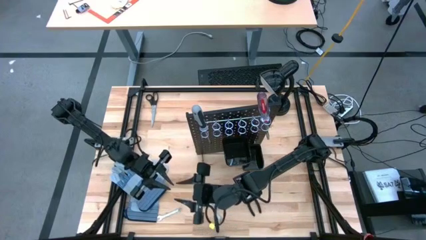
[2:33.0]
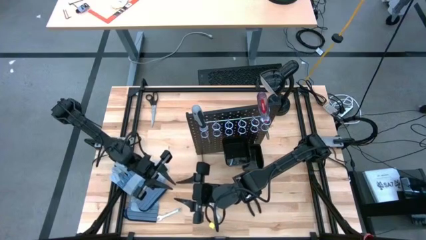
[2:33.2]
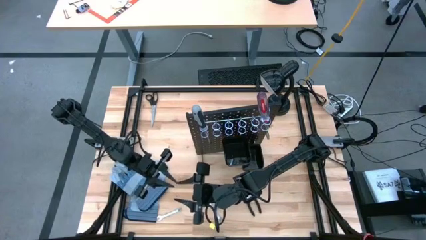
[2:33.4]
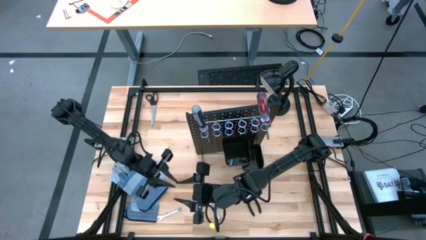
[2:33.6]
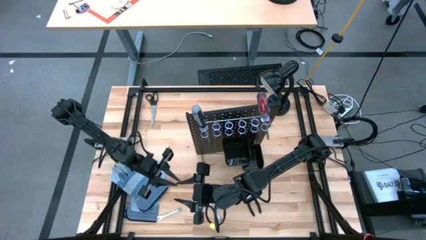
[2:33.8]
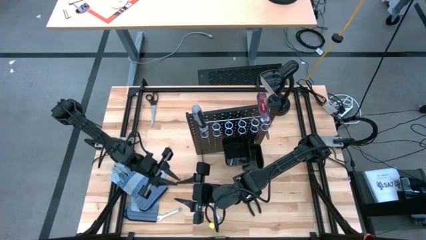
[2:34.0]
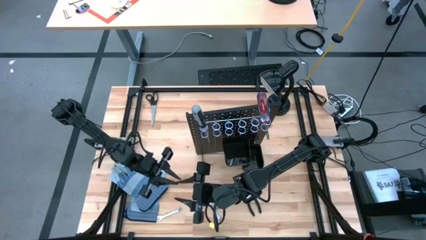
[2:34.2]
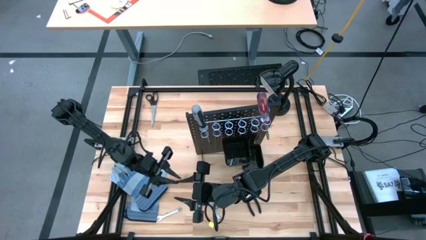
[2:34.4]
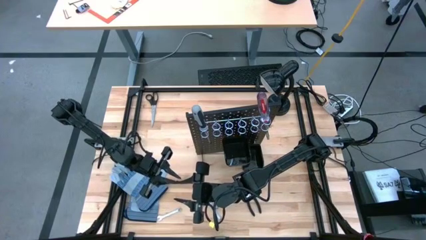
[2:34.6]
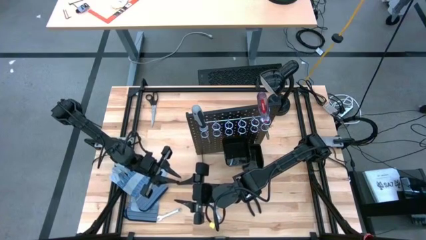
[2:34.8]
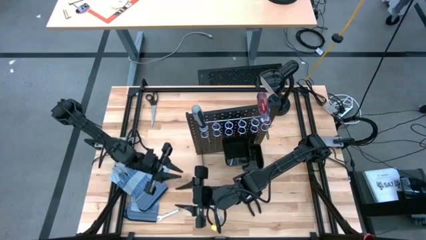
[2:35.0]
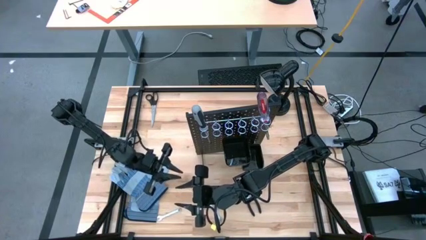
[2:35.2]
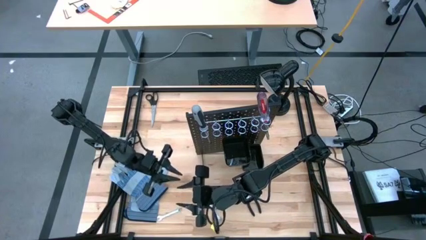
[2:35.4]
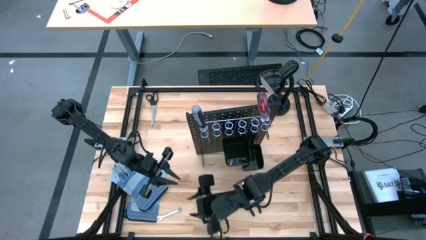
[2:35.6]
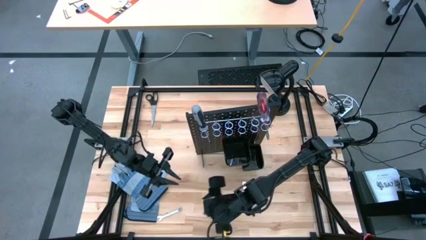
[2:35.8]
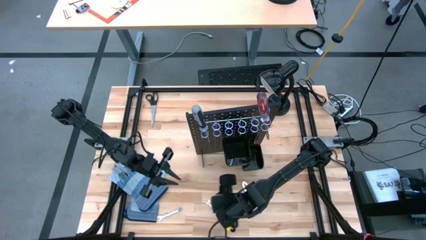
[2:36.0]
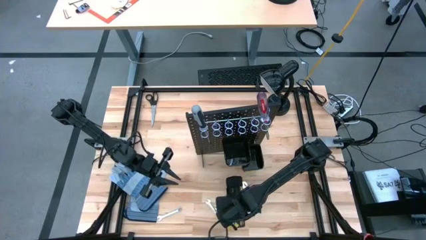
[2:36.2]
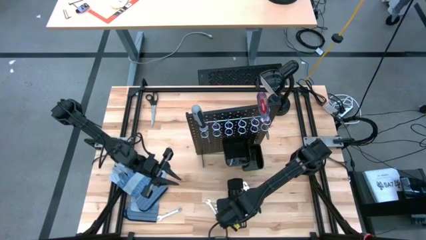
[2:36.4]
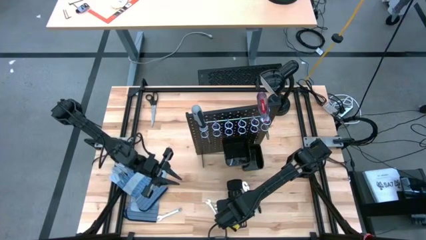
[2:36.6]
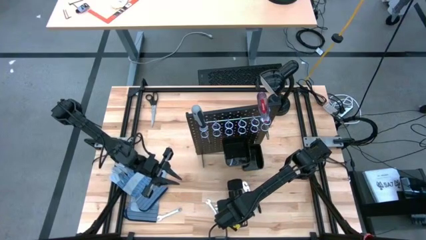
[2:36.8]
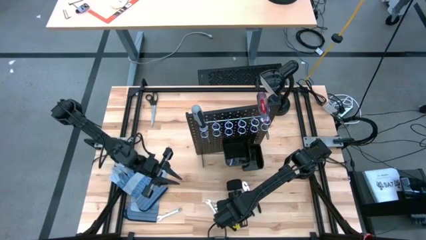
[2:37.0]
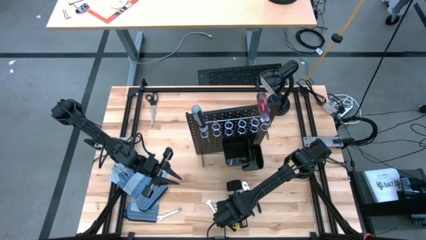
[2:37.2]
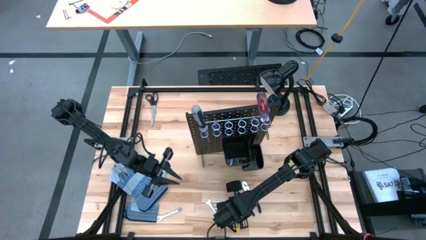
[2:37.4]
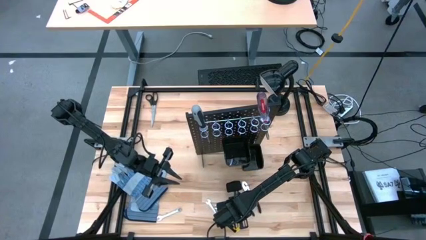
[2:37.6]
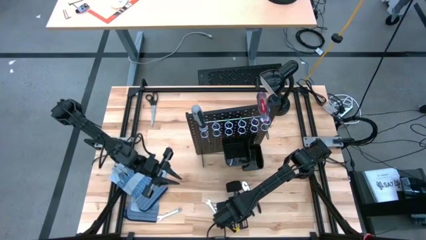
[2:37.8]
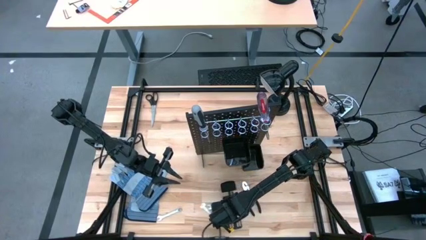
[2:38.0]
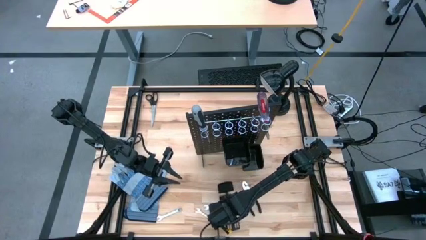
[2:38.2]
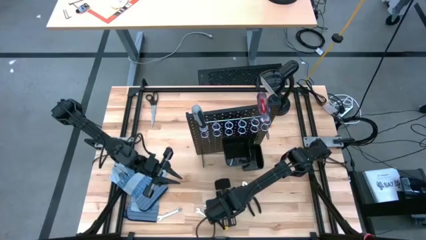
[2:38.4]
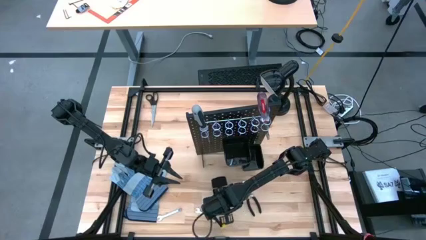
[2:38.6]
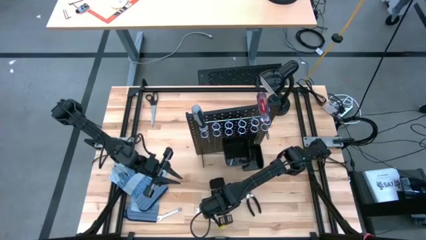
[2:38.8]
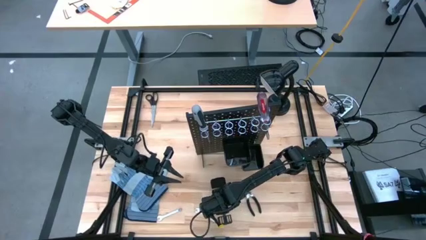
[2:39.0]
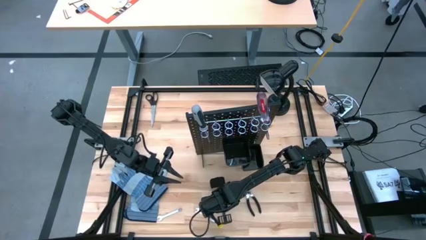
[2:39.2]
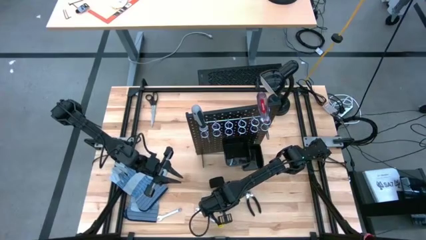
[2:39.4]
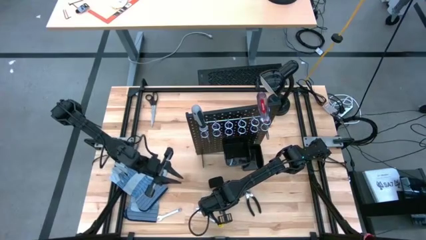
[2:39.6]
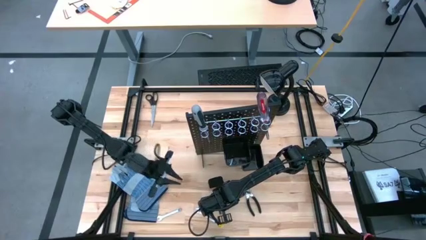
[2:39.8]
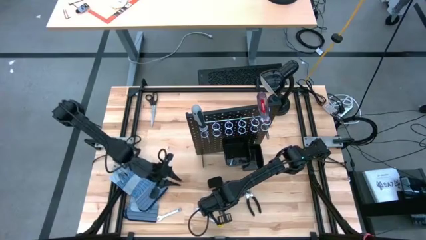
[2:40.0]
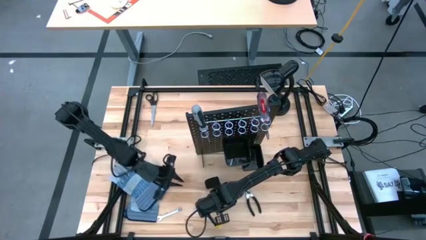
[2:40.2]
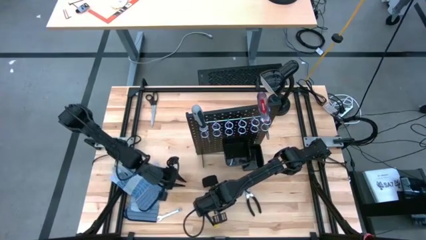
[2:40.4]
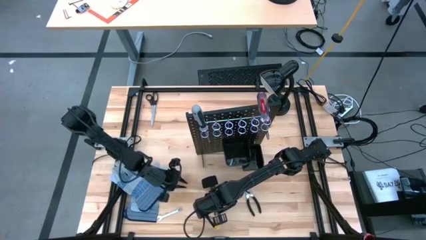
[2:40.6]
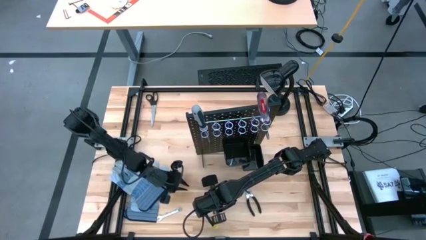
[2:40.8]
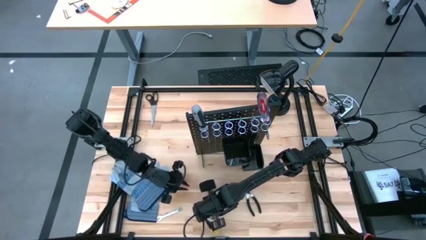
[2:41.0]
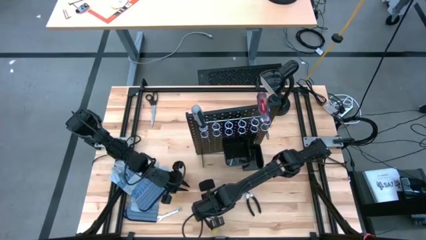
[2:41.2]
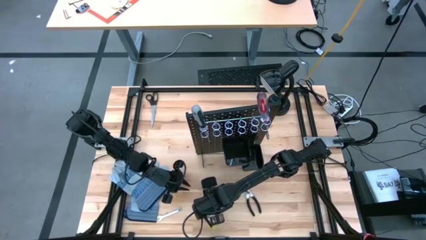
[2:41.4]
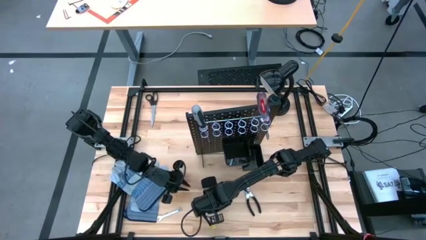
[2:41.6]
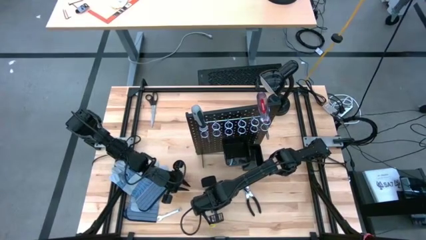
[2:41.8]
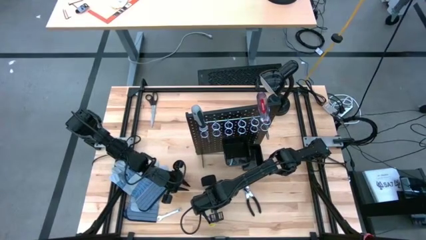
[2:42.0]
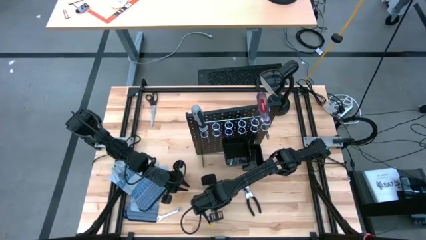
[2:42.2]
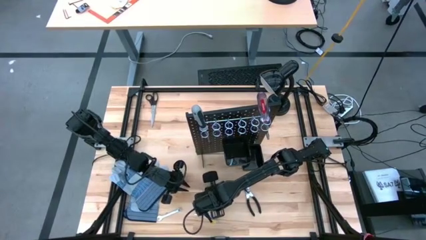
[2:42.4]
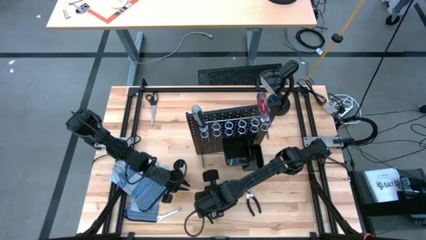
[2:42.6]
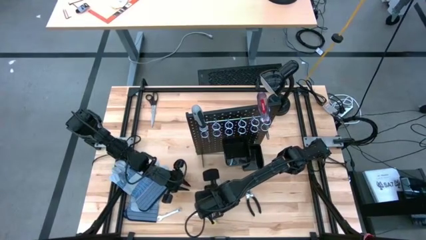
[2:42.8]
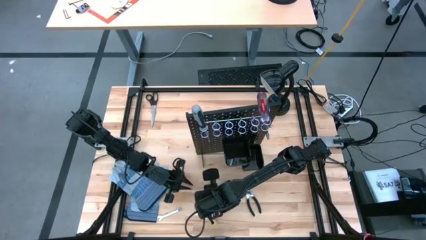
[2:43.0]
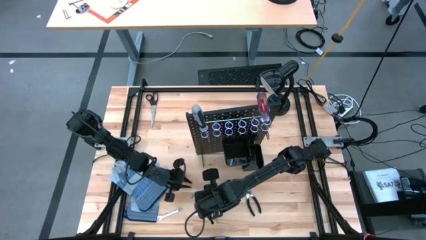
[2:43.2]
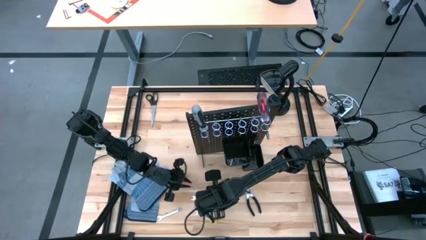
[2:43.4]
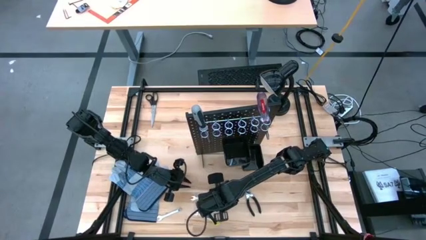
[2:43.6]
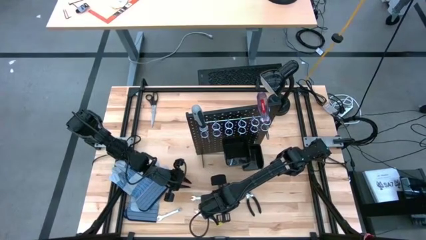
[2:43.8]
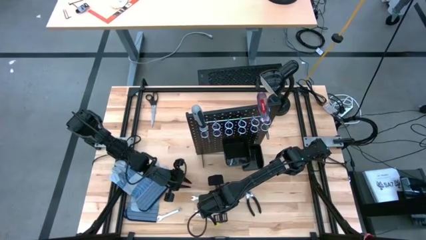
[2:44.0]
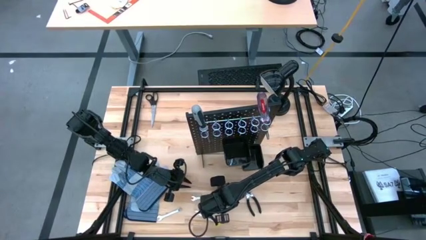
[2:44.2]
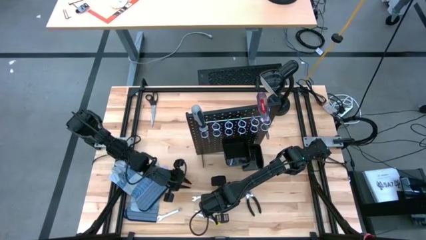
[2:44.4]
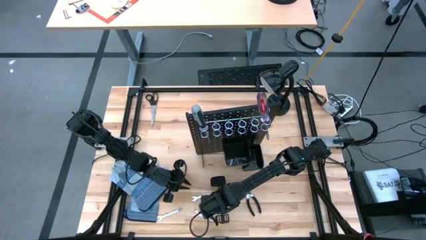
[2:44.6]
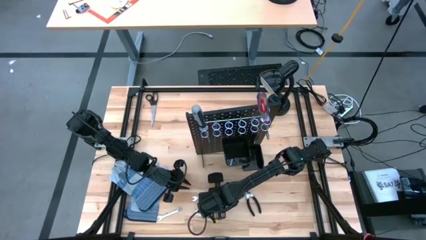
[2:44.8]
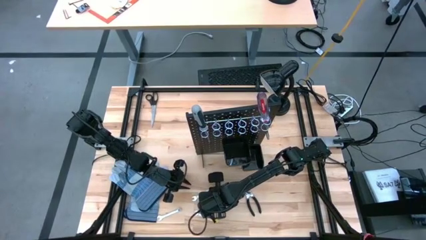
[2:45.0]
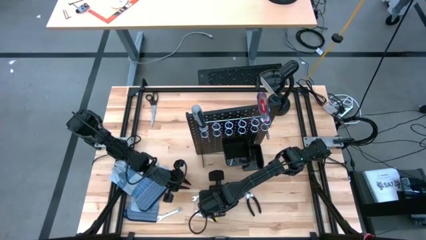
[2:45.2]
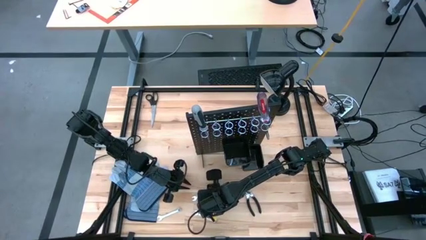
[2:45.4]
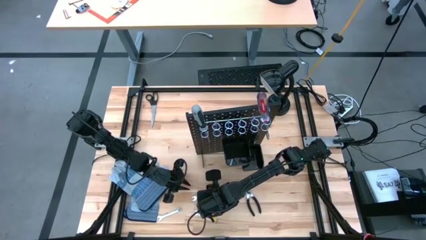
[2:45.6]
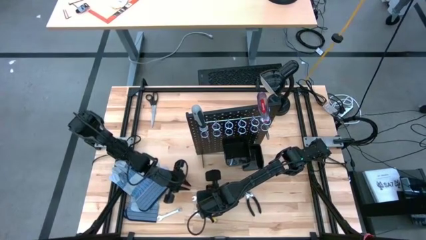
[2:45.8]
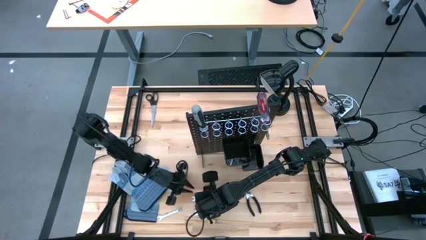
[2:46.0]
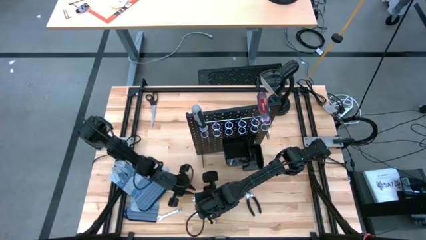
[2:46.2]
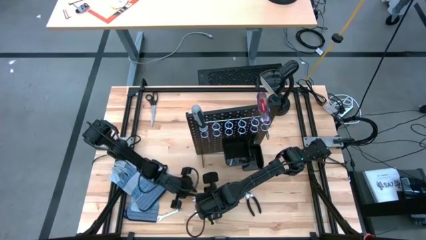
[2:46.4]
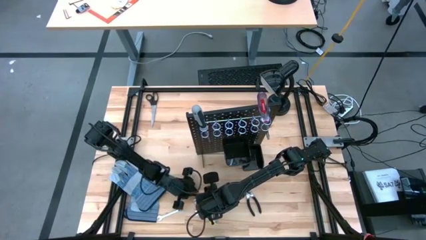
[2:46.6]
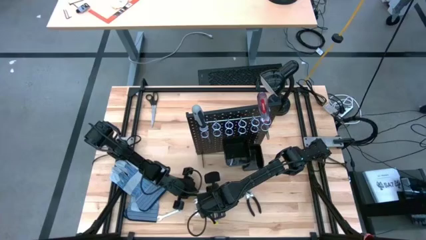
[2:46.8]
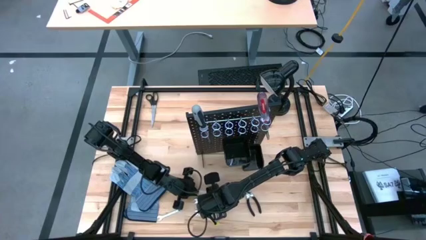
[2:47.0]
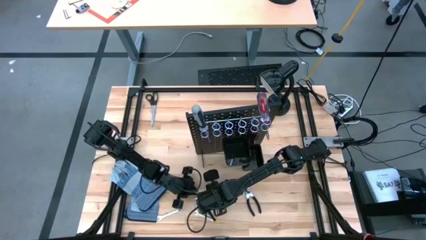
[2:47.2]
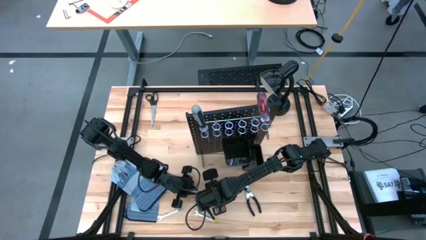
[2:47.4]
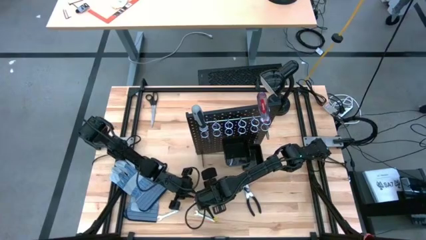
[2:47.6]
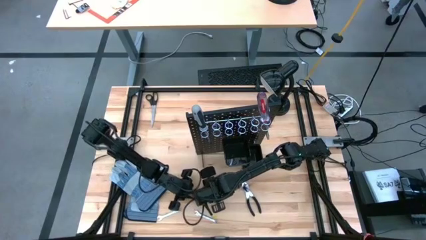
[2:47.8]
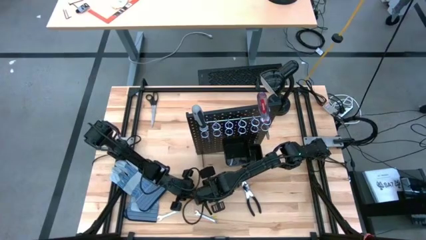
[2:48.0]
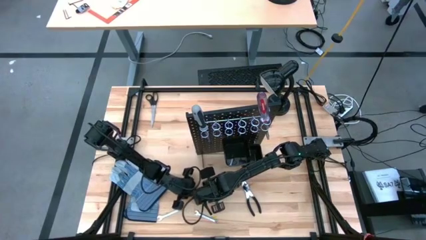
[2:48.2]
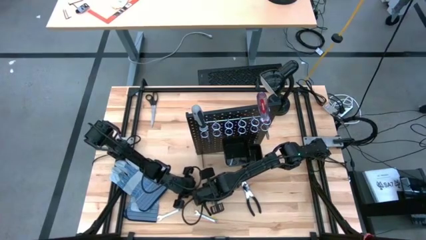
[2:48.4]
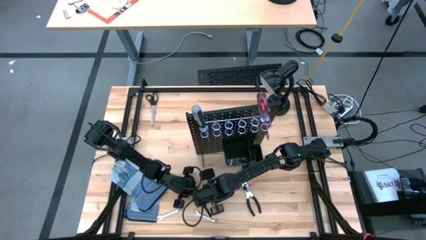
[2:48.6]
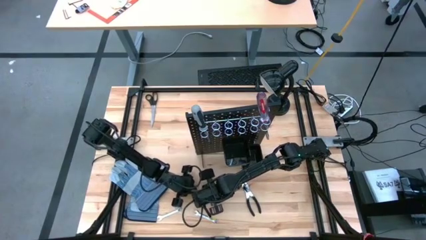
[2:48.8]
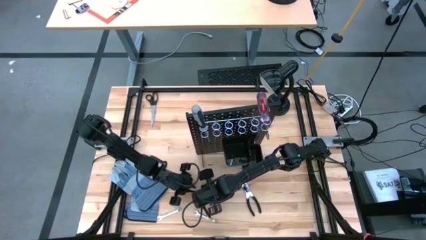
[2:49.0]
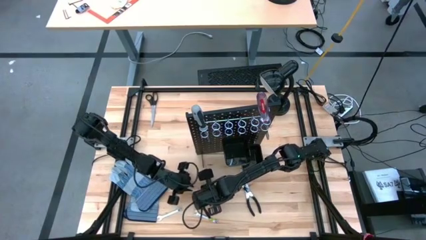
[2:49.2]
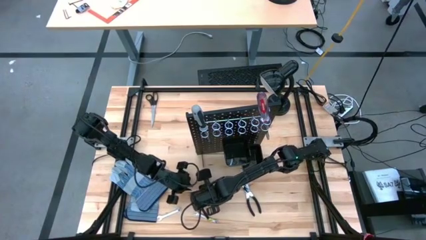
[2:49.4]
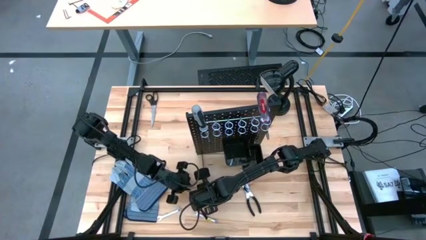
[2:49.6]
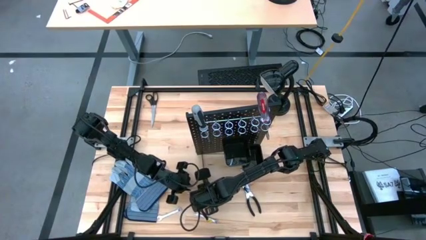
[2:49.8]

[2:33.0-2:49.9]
Task: Hang tools onto peg board
Hang the silver wrench on the black peg board
